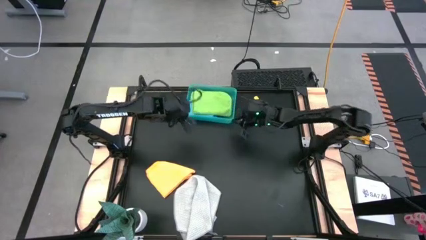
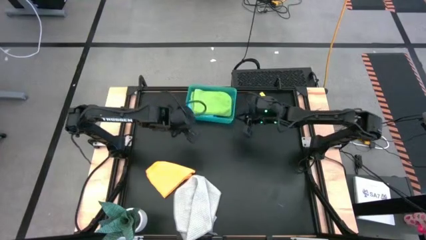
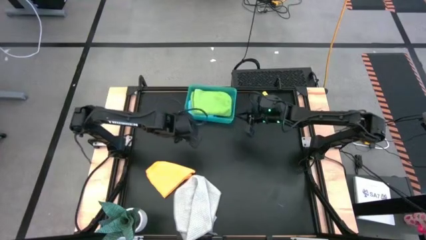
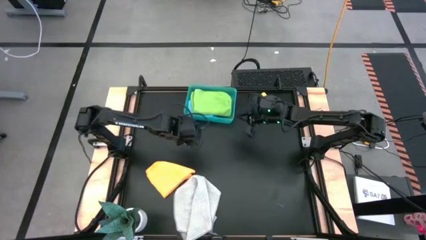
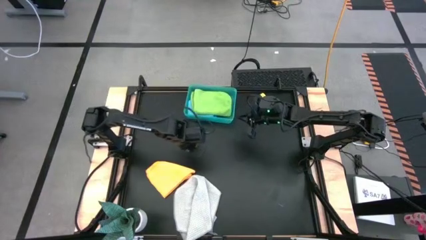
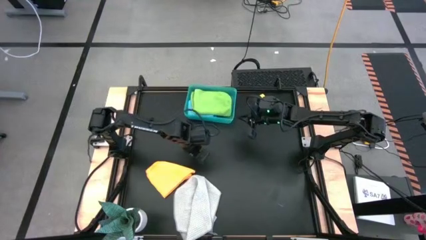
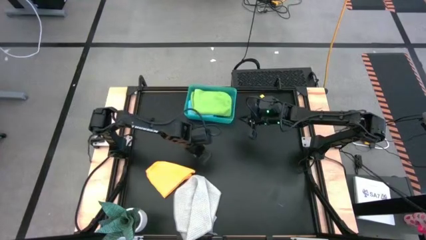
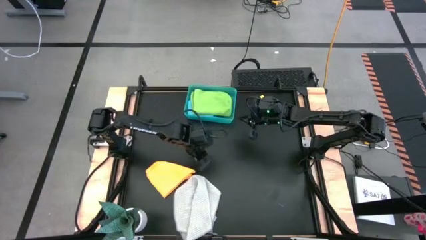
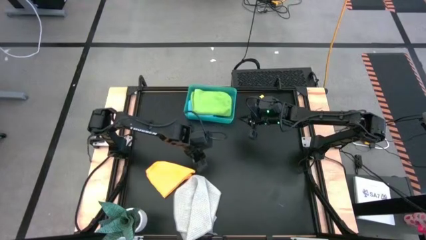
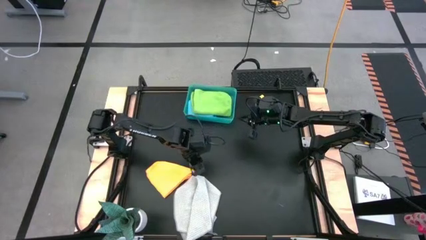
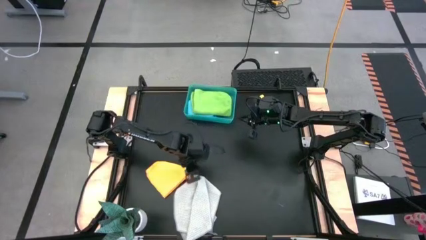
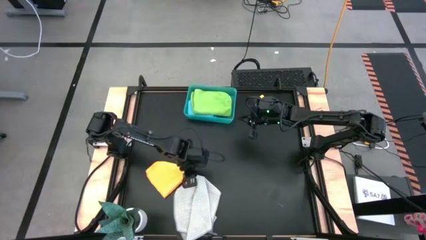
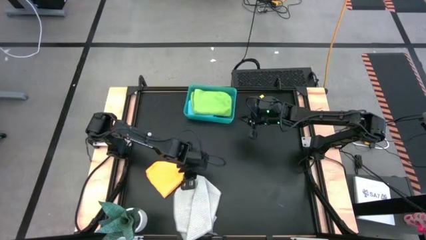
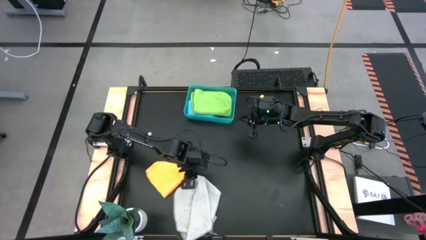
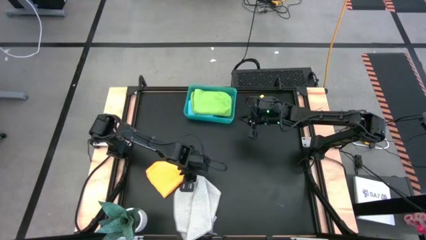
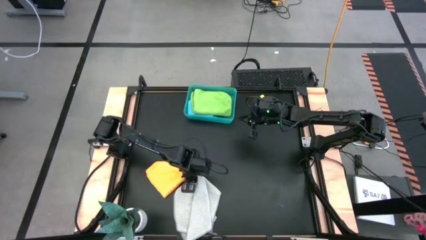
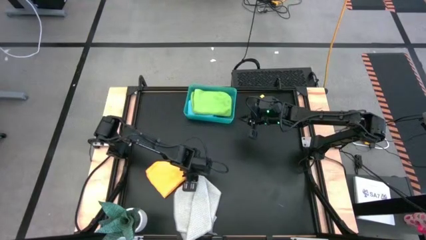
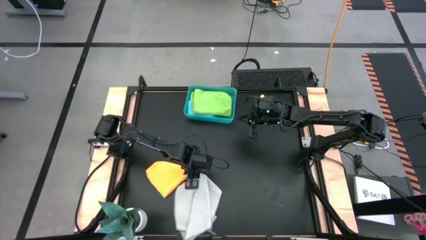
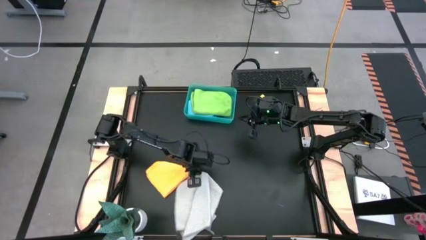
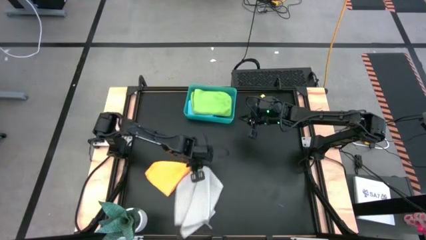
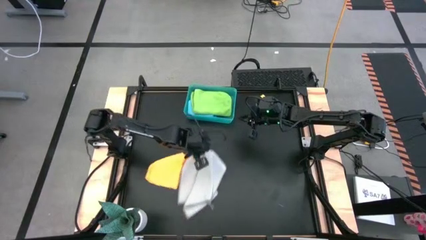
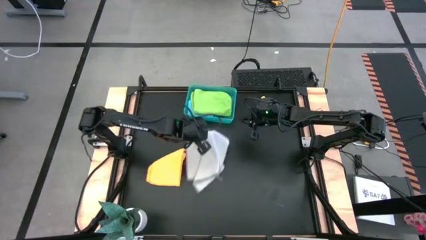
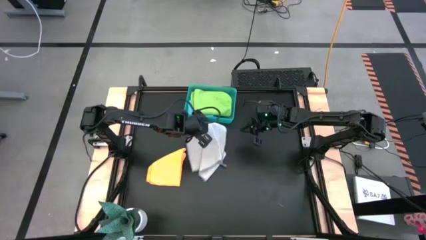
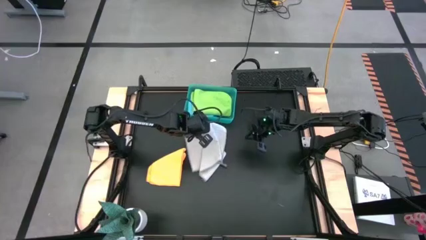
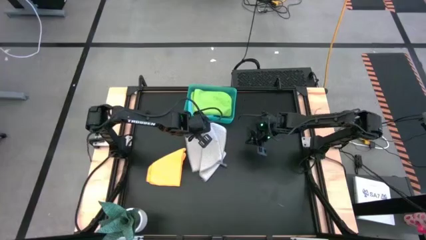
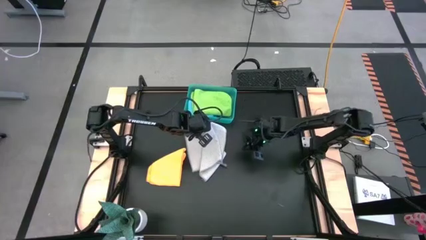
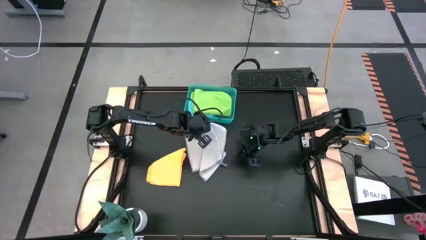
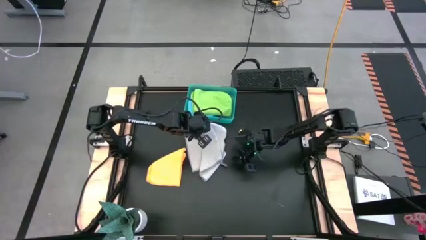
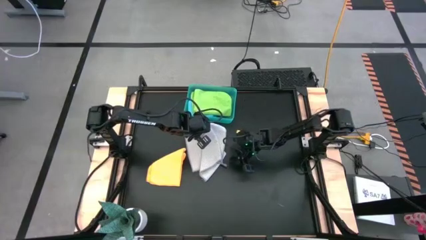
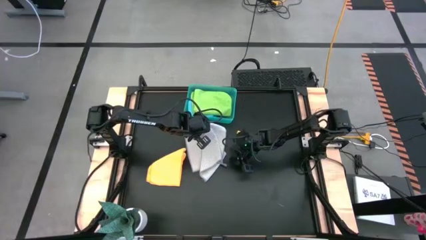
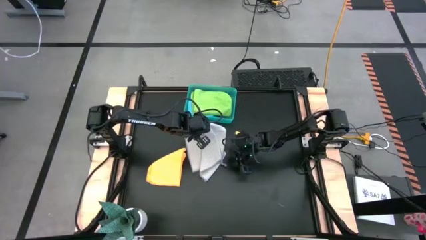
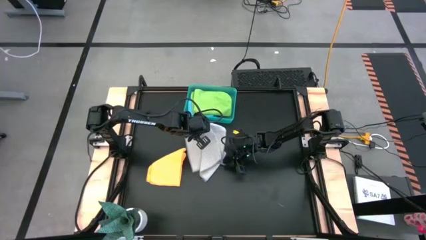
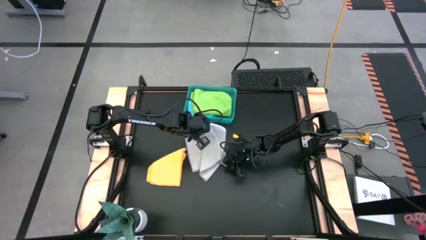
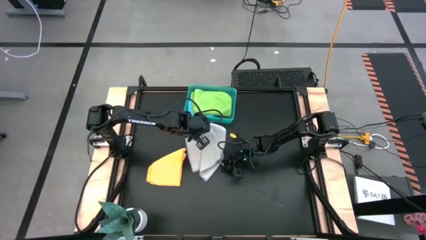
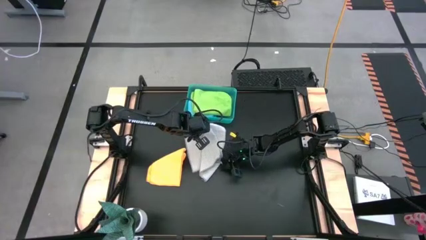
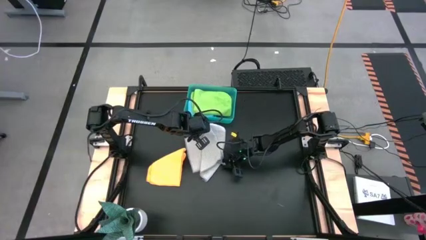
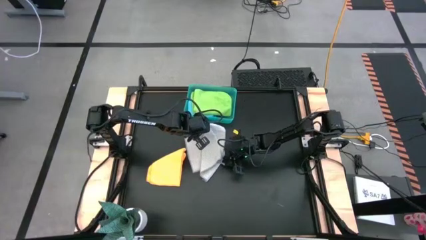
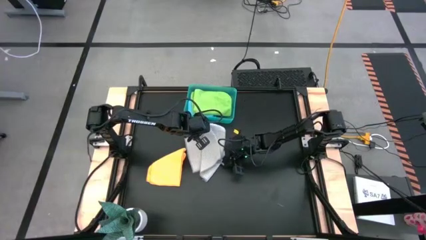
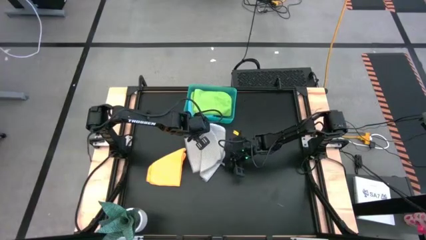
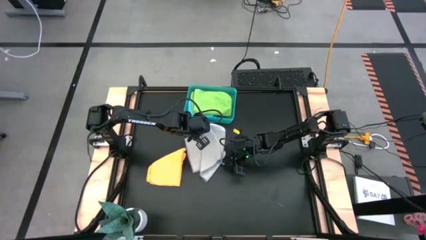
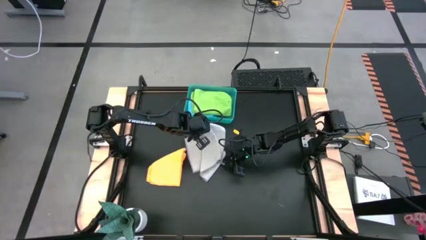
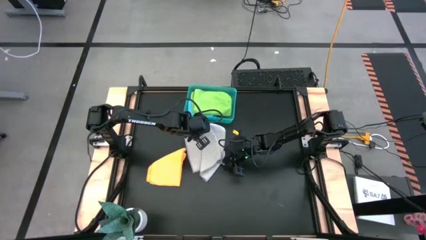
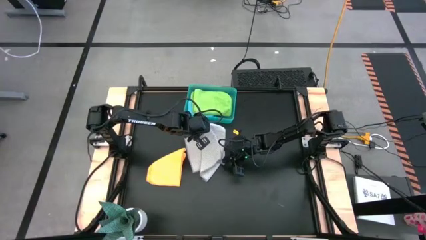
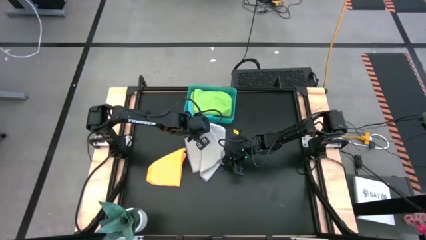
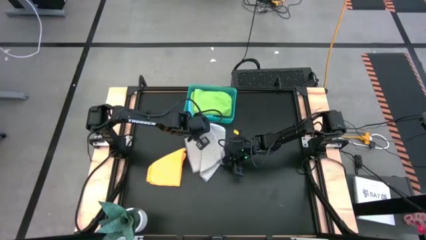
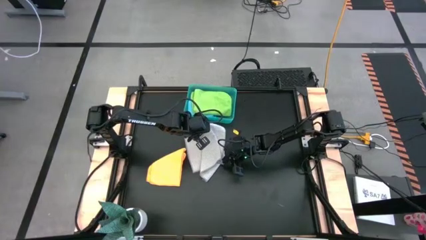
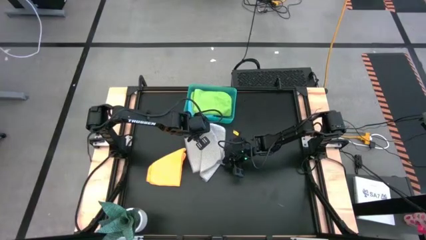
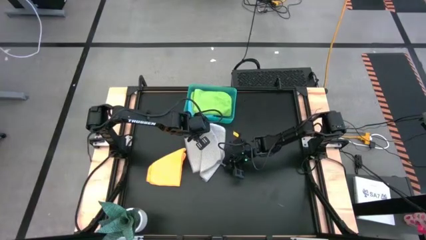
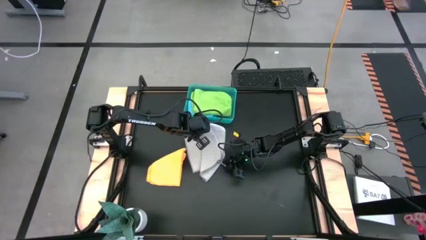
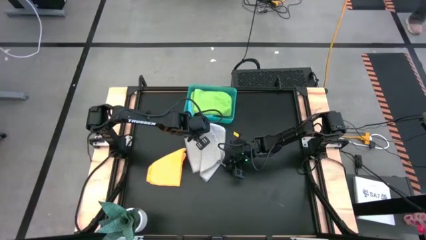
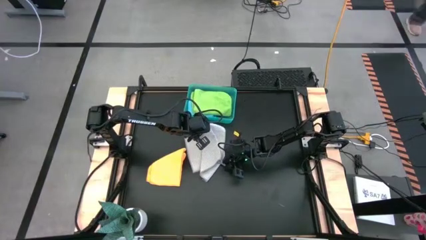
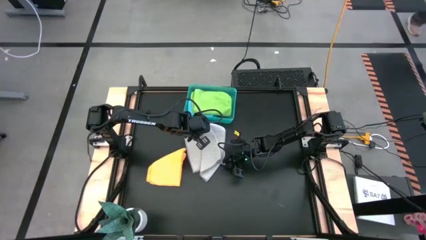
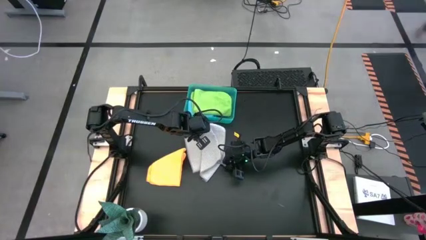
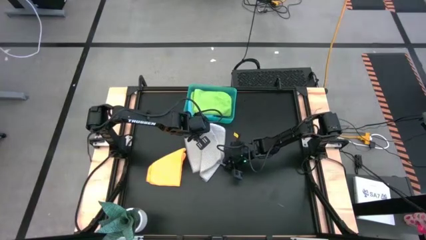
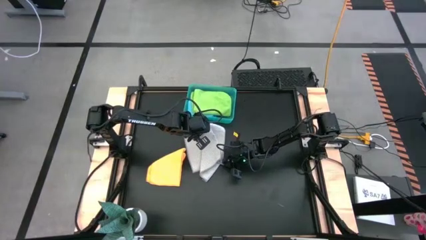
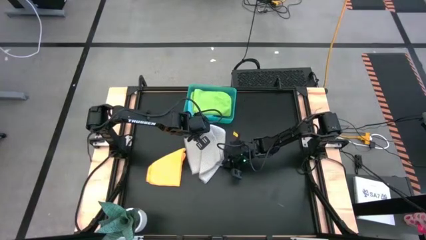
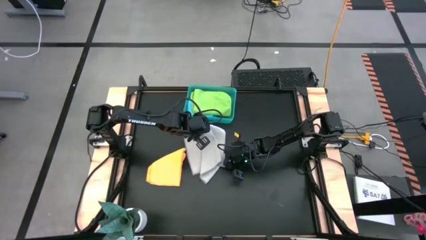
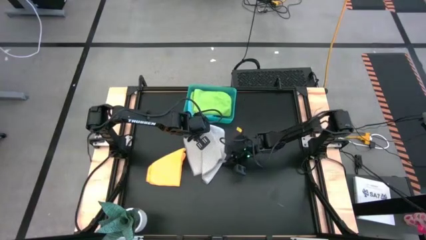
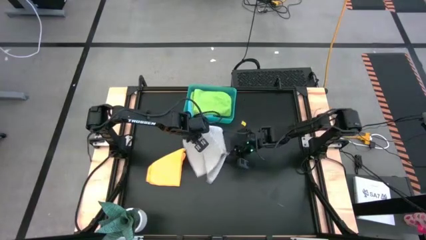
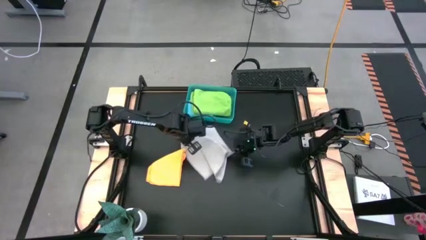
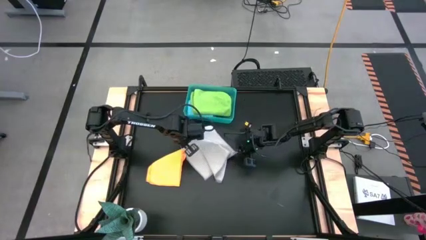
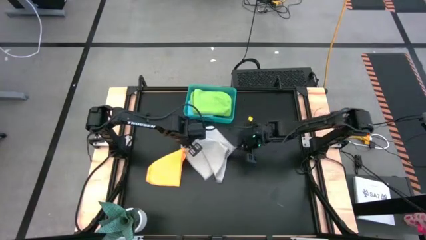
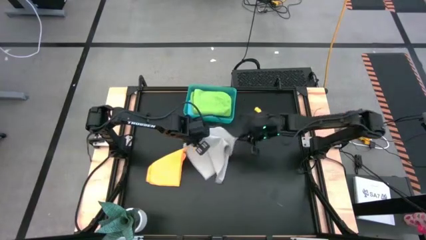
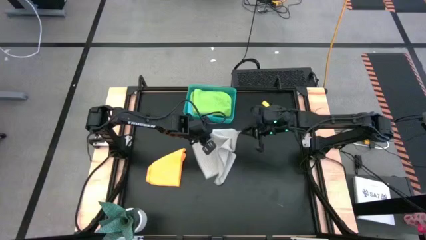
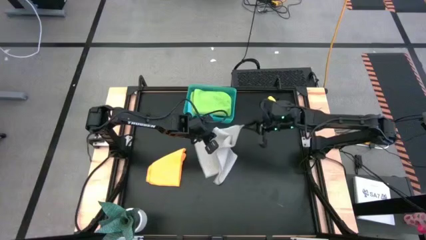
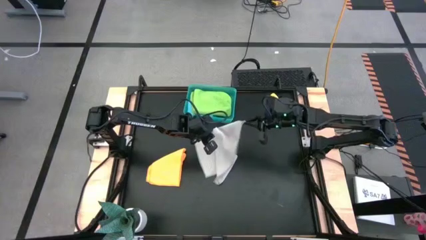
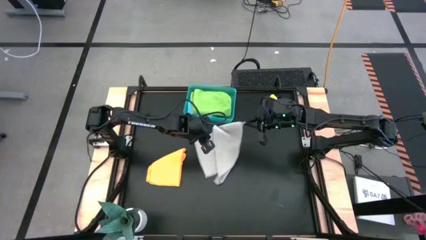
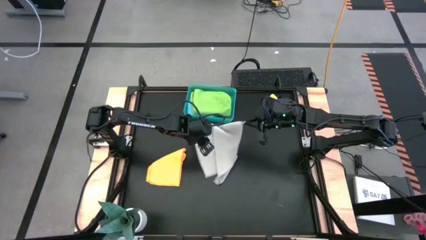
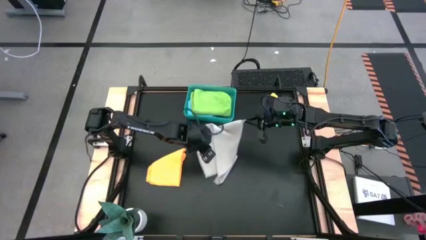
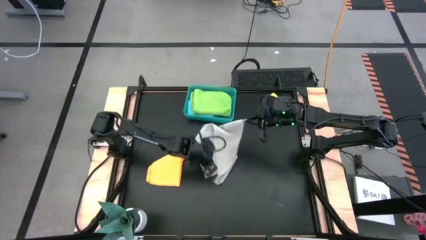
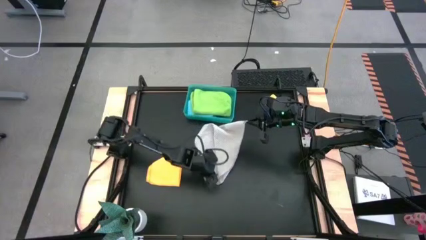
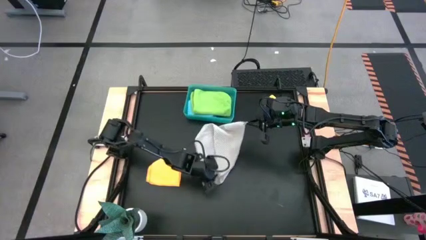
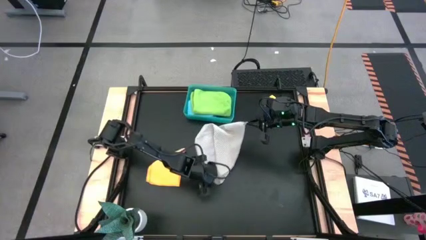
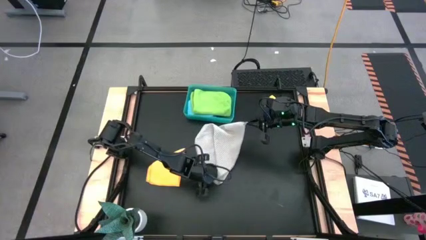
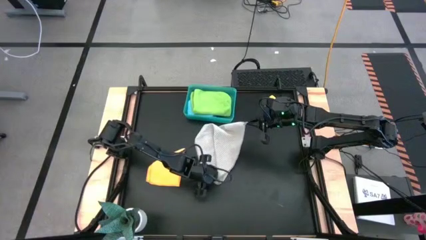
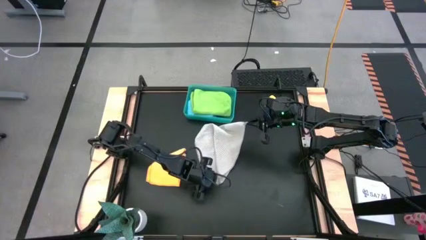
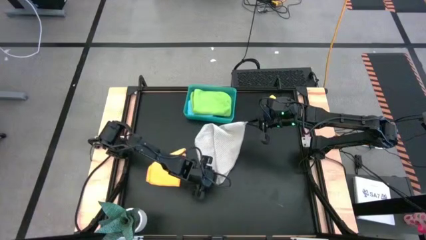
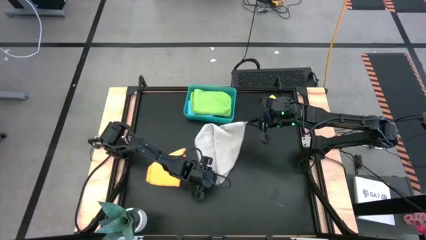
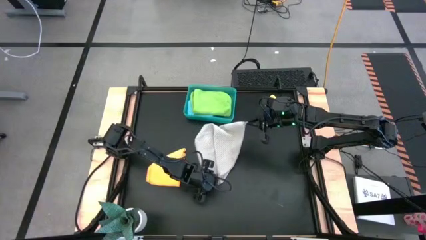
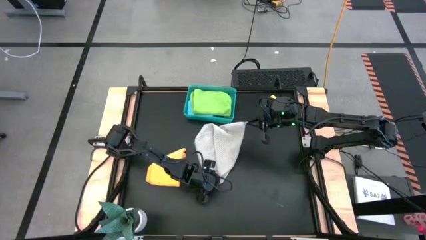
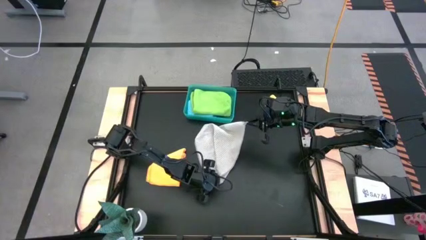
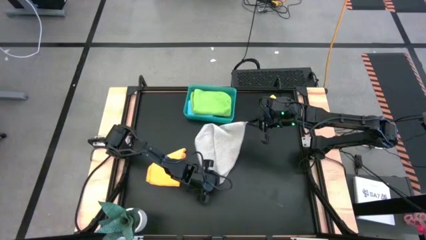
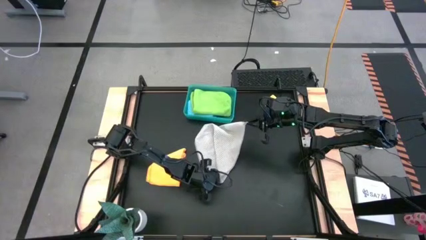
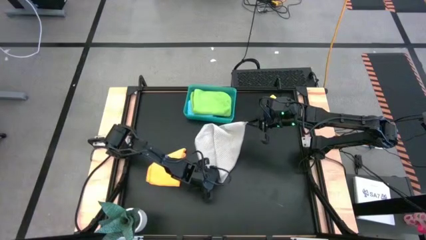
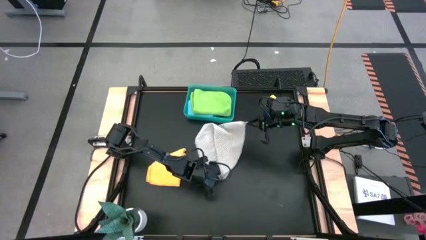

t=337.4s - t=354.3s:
Task: Fold microfiber towels
Fold the gray towel
